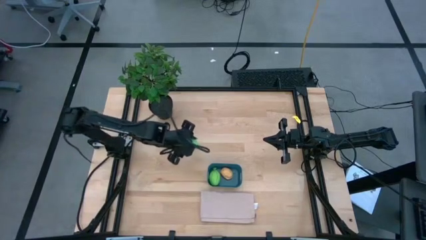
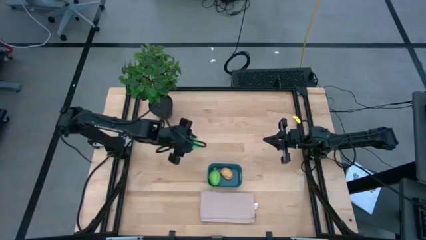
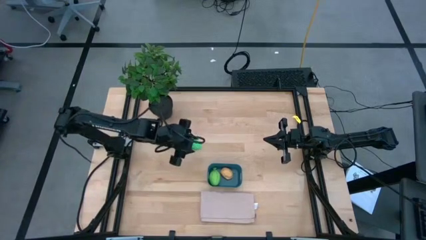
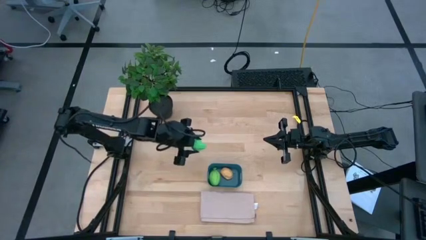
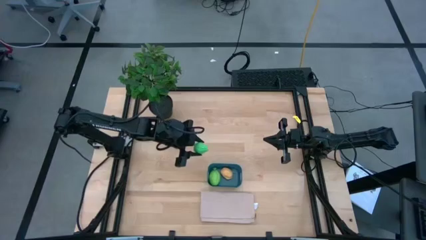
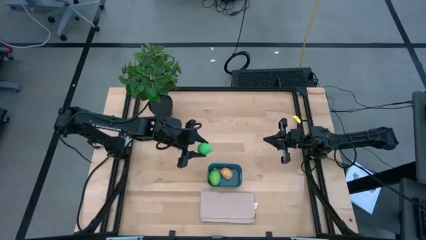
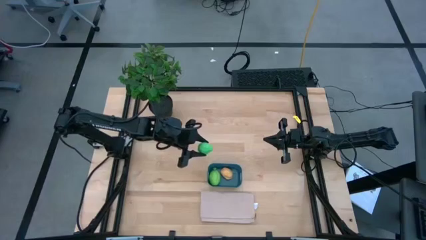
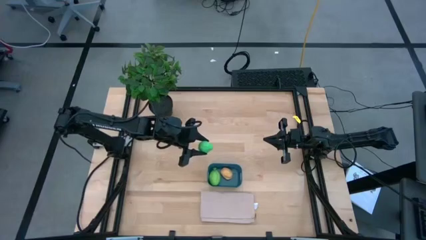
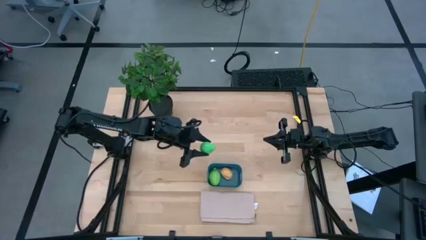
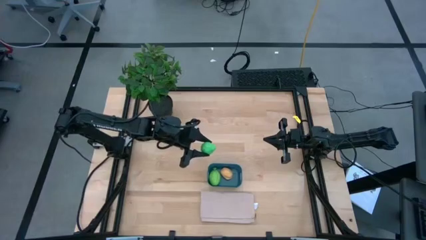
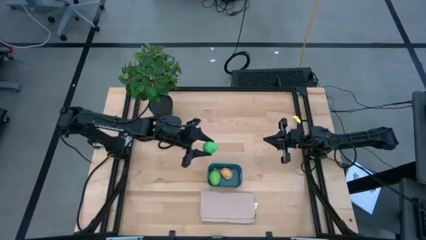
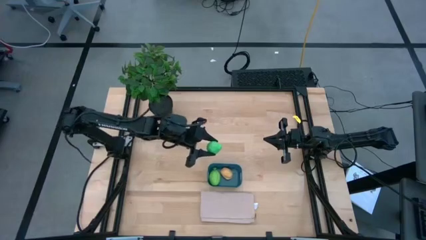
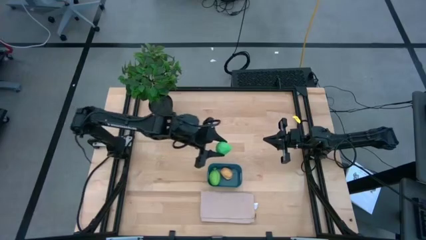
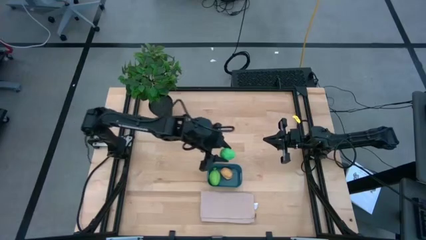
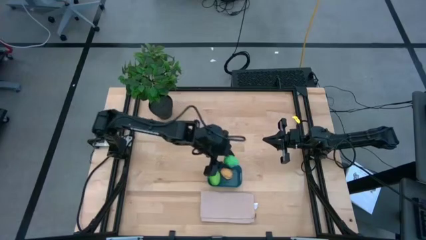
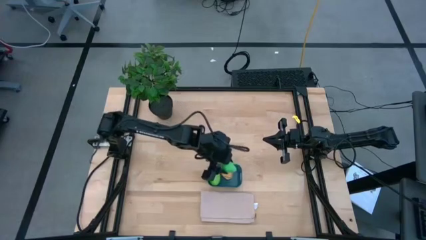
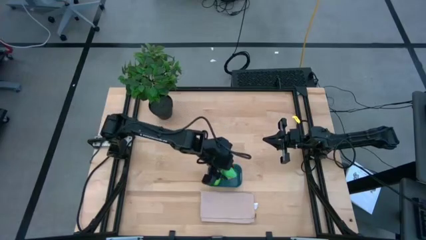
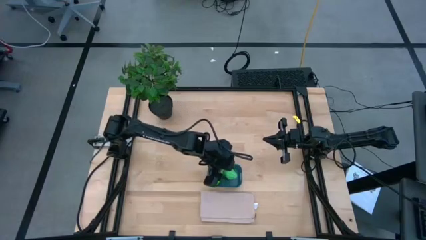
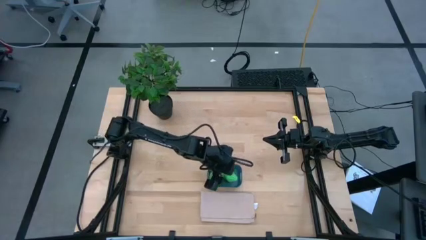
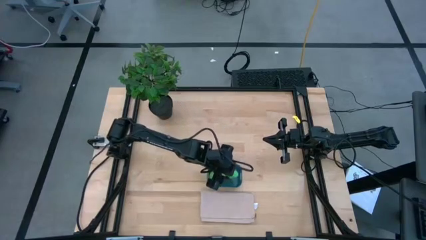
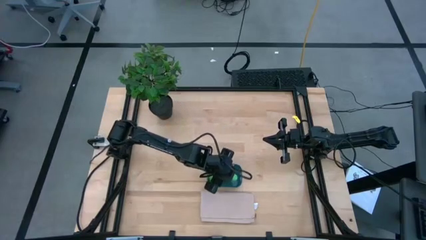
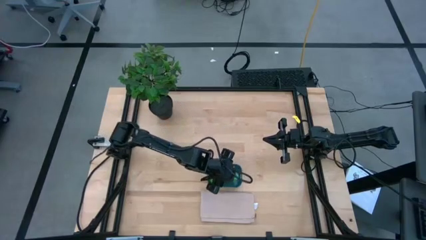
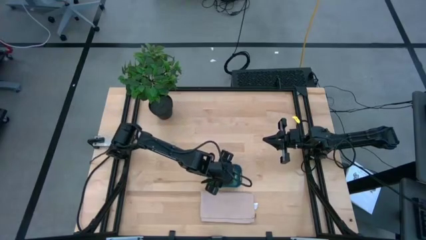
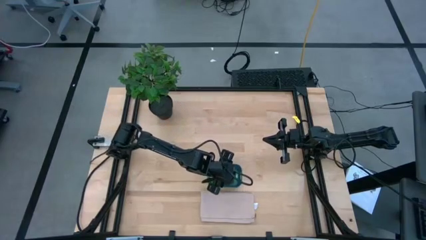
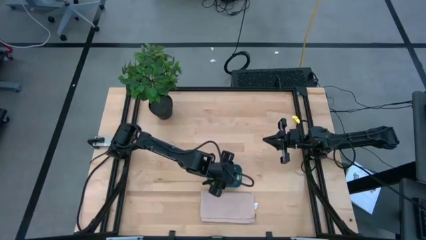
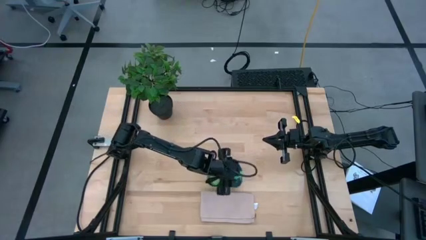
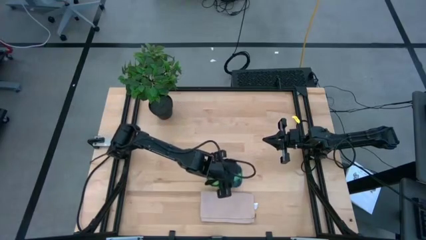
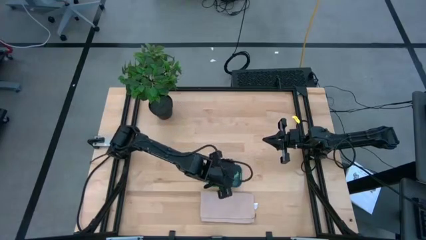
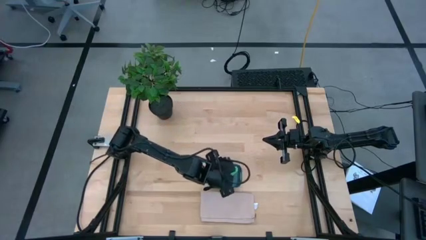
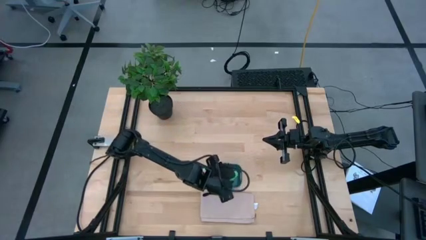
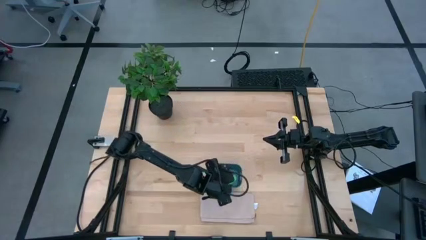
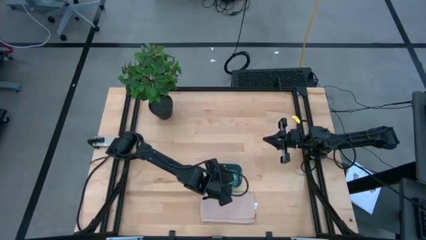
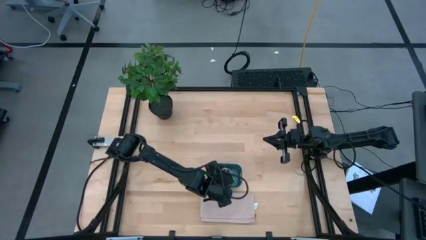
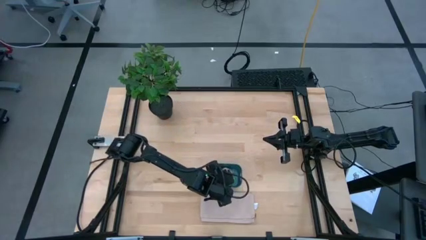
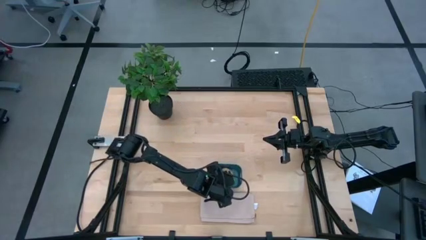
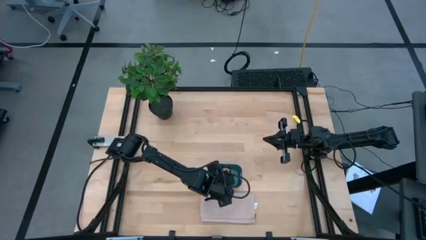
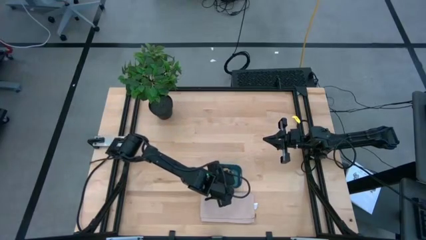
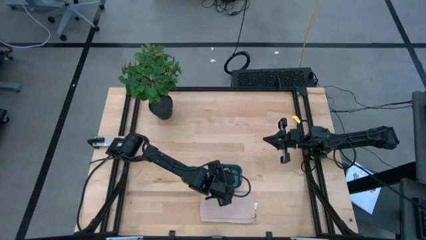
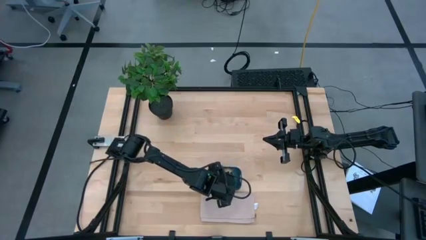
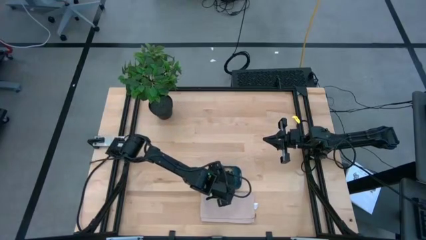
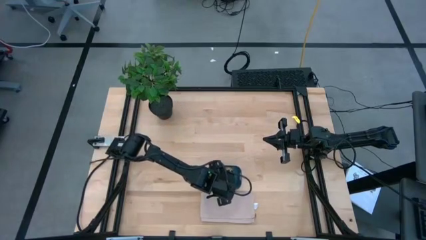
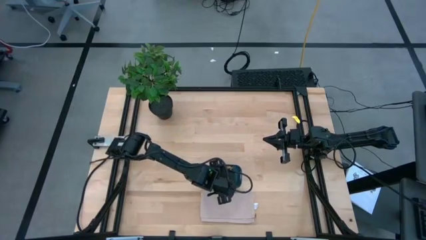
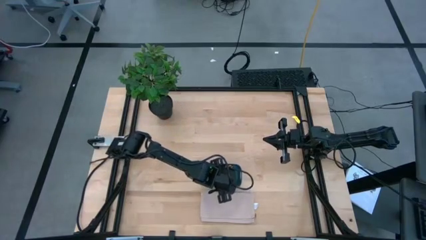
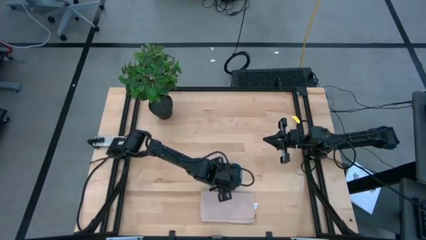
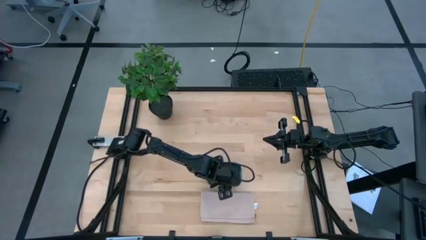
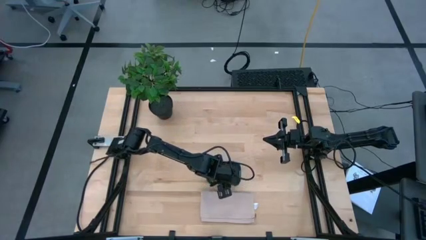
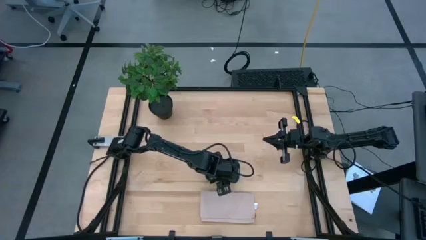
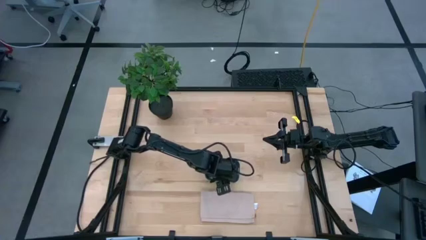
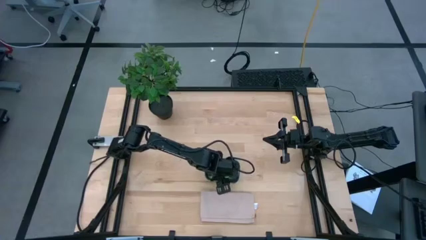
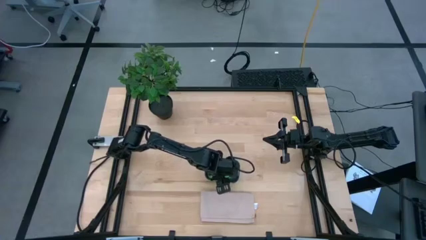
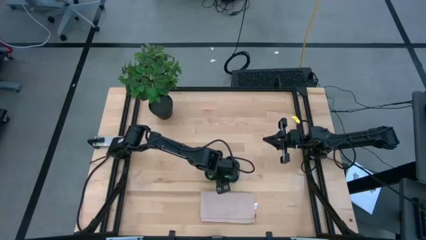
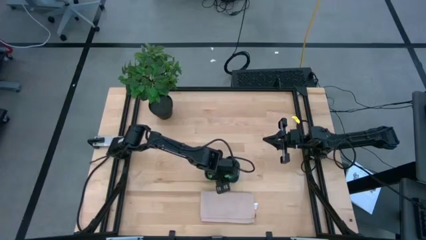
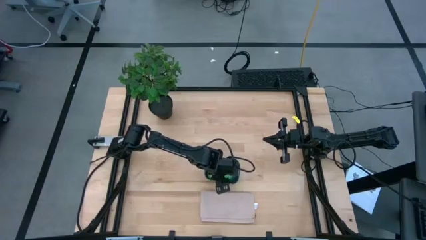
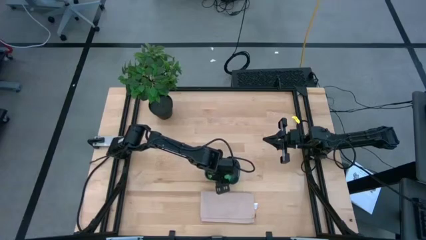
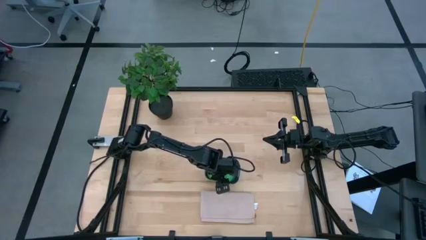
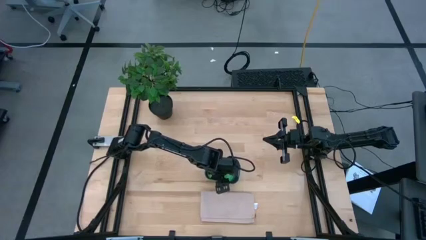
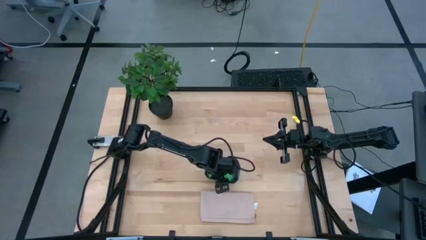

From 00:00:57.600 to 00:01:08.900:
Task: Pick and placing Produce into tupperware
Put the green pear into the blue bin

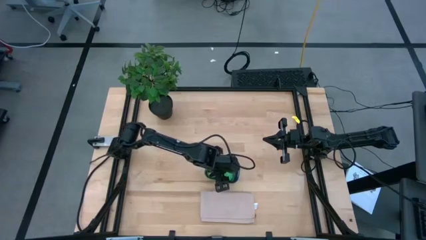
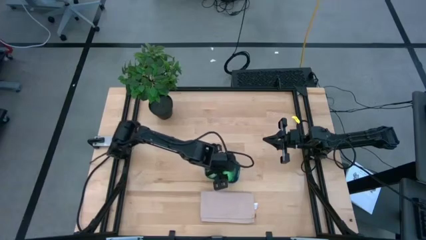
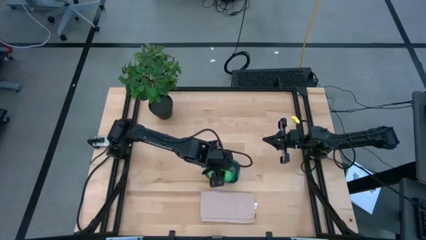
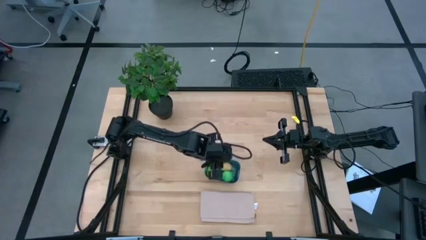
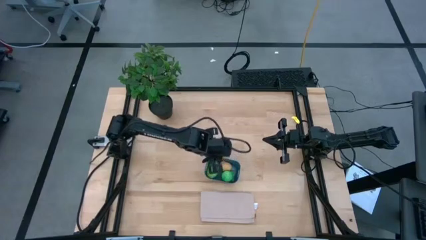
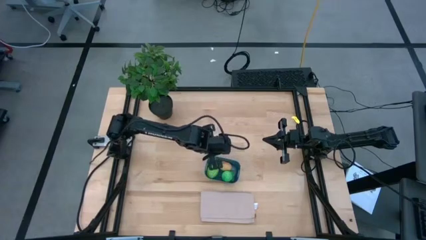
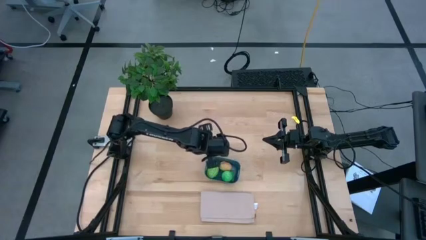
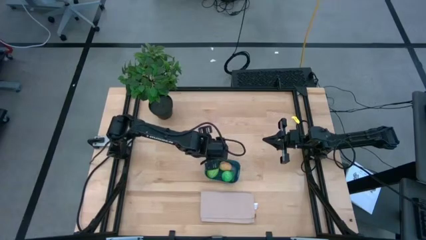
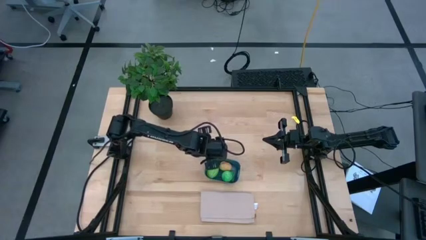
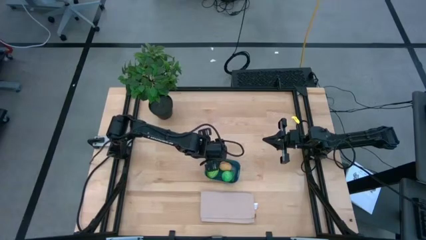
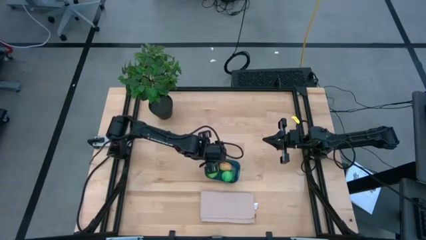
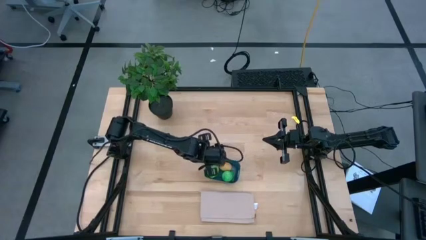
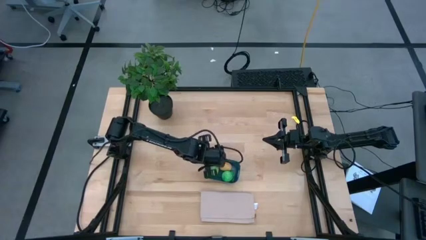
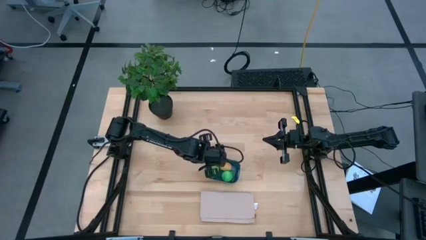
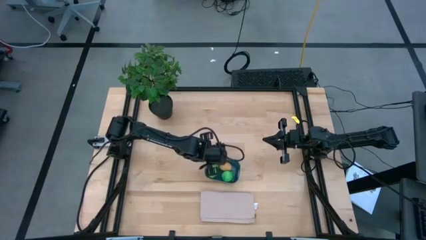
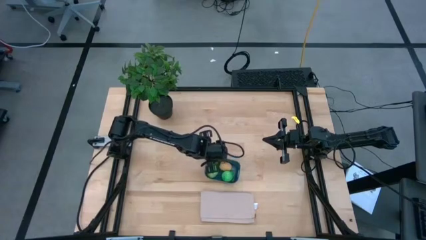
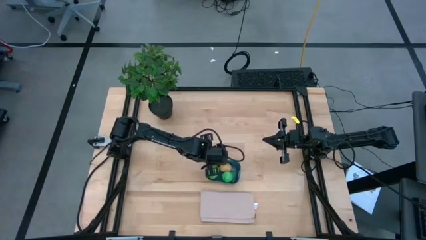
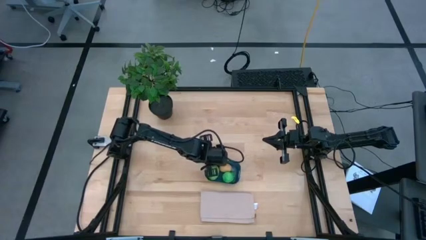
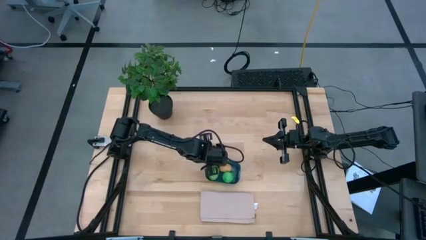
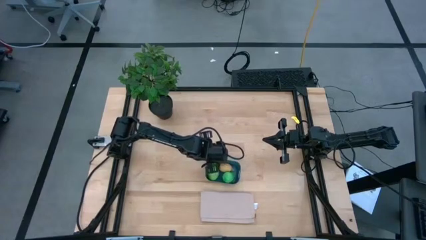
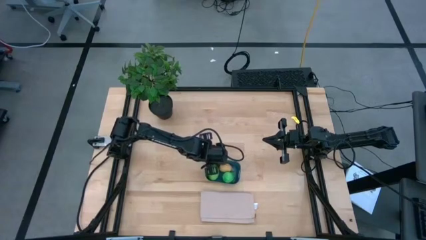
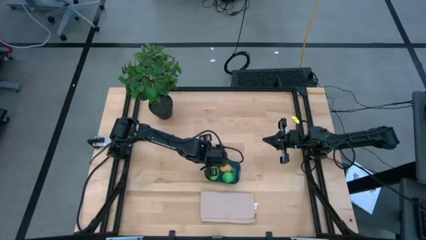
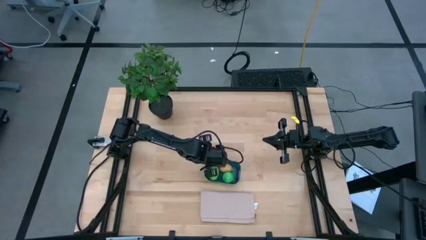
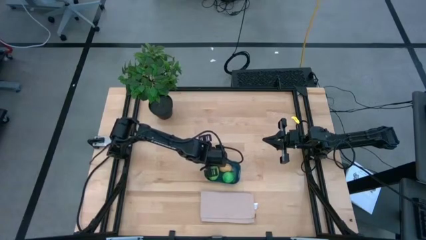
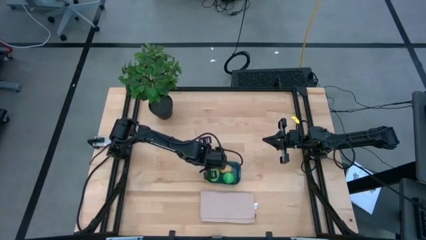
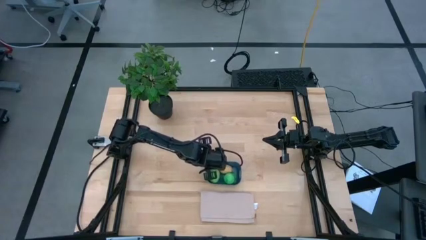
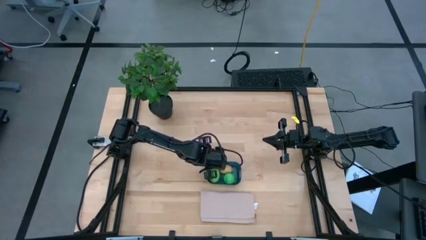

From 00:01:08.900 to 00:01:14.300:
Adjust the blue bin

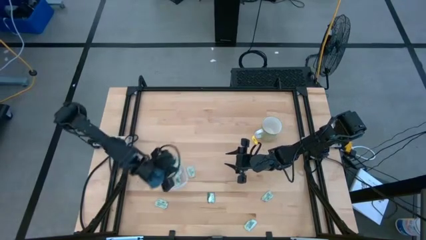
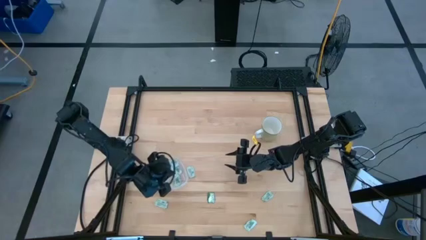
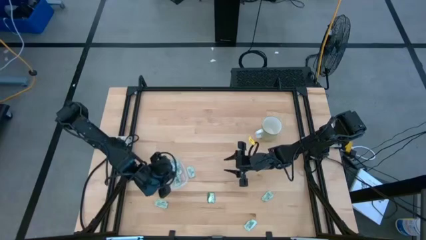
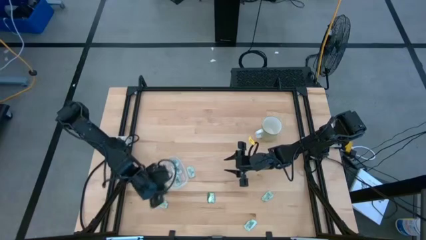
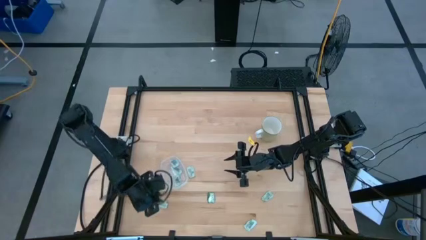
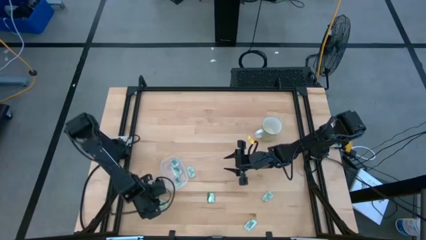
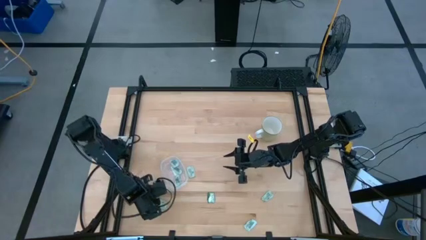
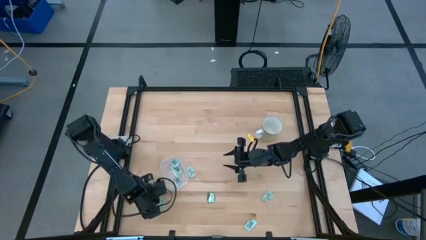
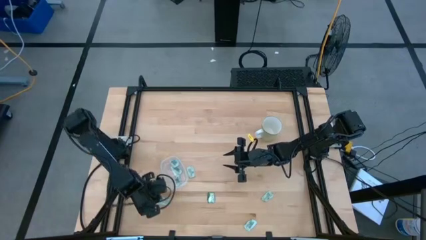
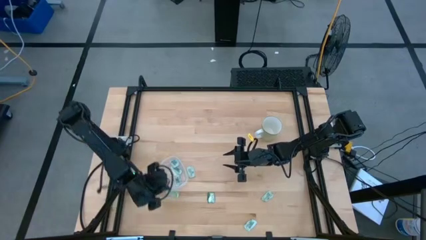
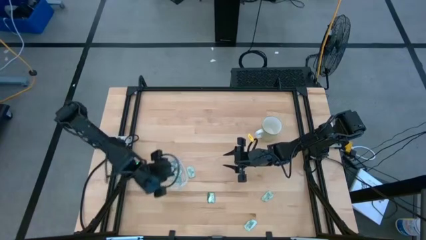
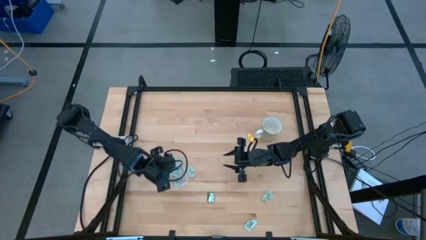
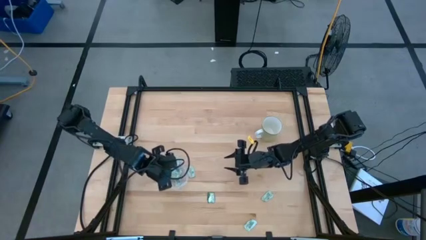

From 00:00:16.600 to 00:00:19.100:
Task: Pick and place Stevia / Truvia into bins
Put the green stevia packet into the transparent bin
